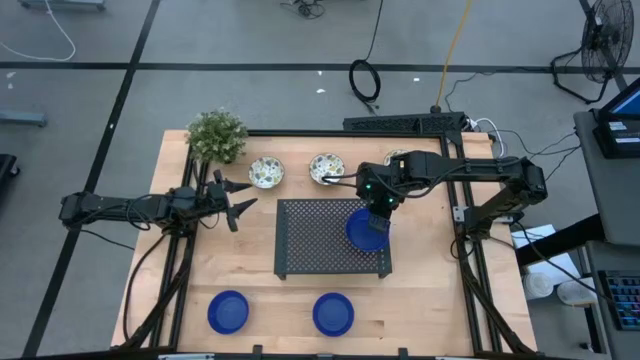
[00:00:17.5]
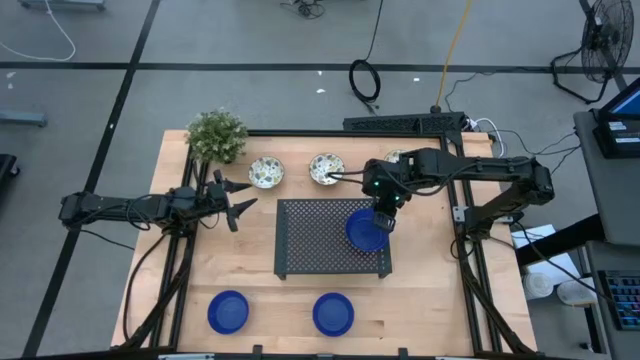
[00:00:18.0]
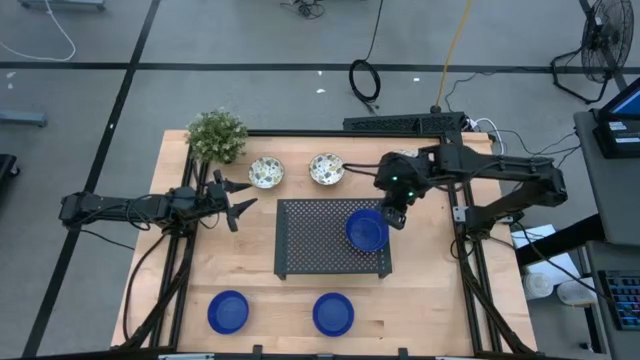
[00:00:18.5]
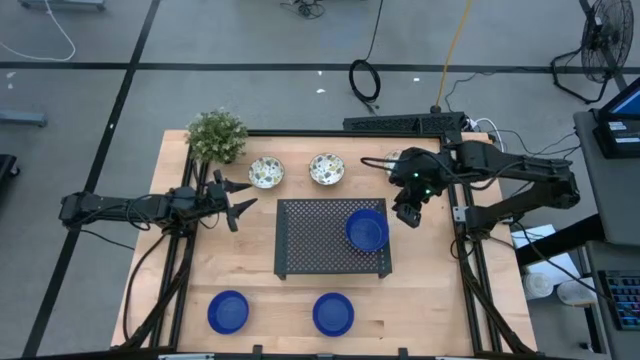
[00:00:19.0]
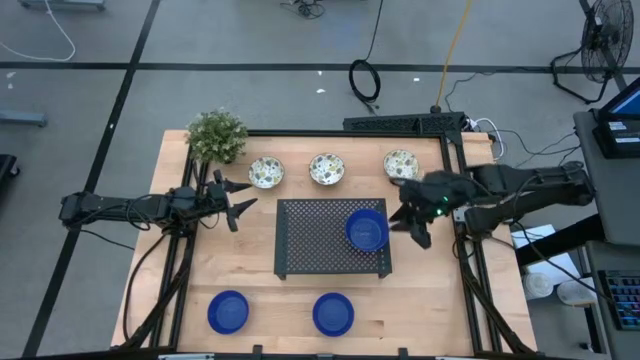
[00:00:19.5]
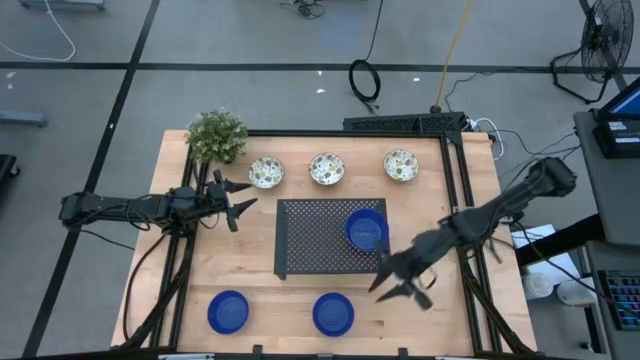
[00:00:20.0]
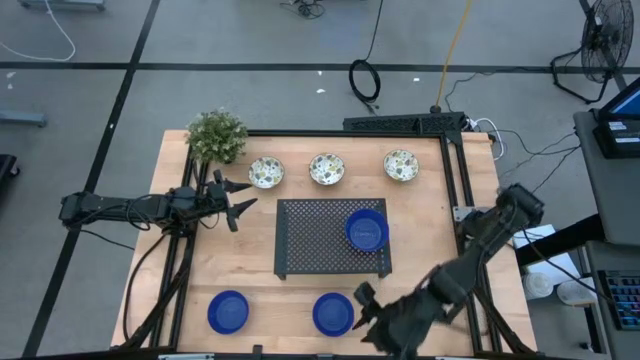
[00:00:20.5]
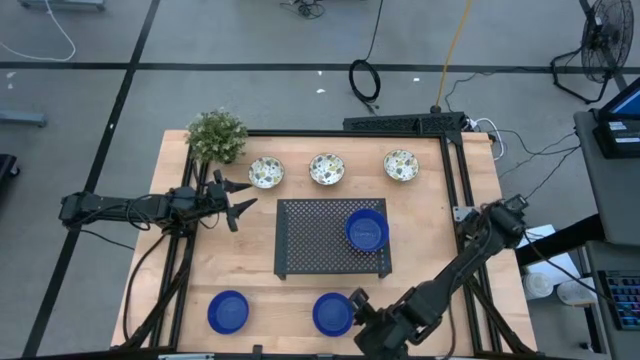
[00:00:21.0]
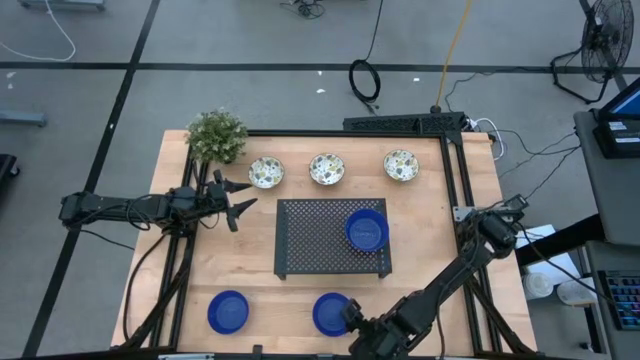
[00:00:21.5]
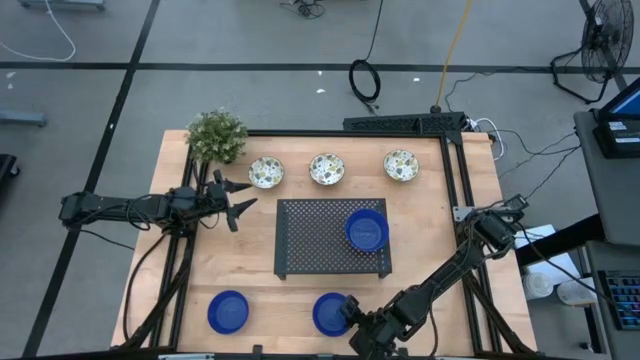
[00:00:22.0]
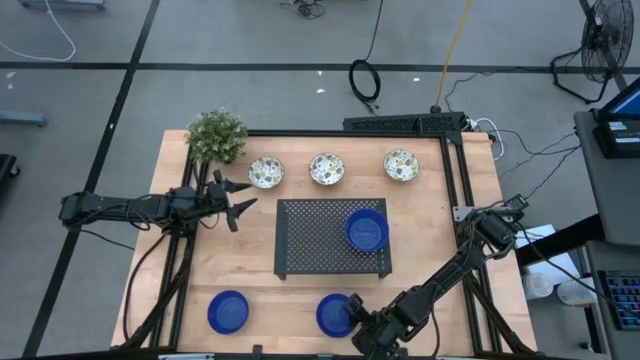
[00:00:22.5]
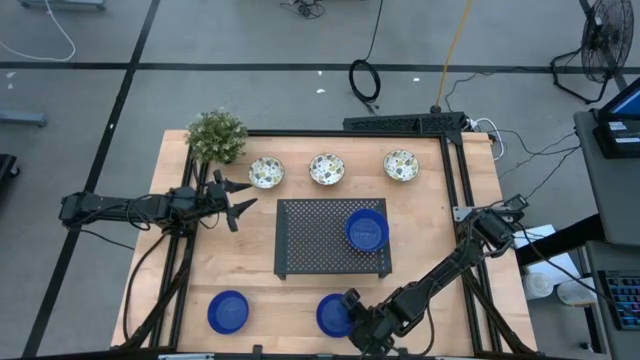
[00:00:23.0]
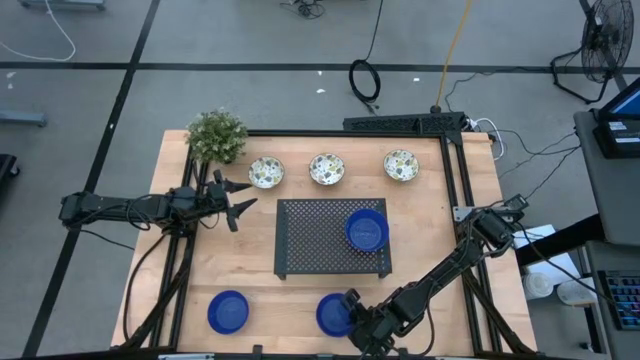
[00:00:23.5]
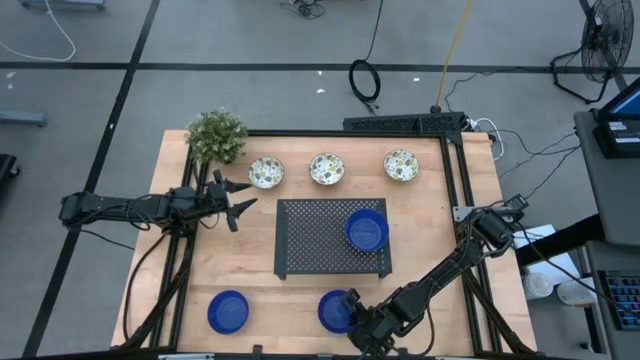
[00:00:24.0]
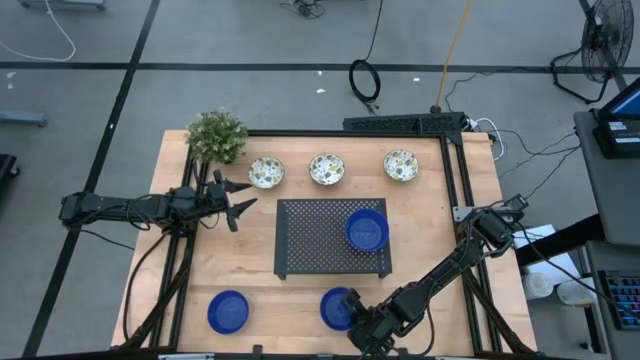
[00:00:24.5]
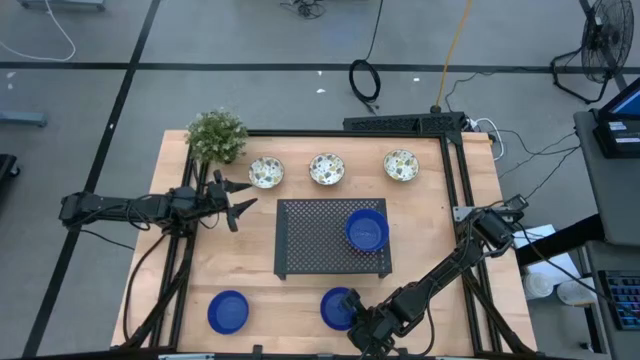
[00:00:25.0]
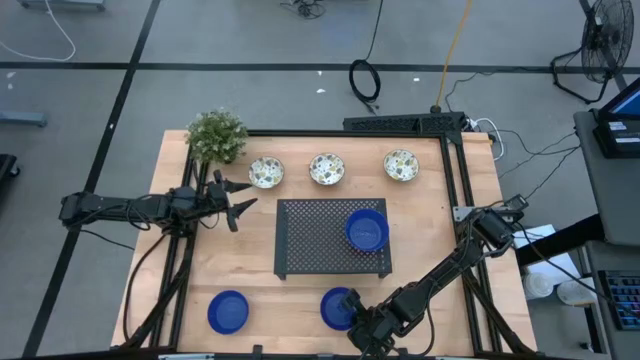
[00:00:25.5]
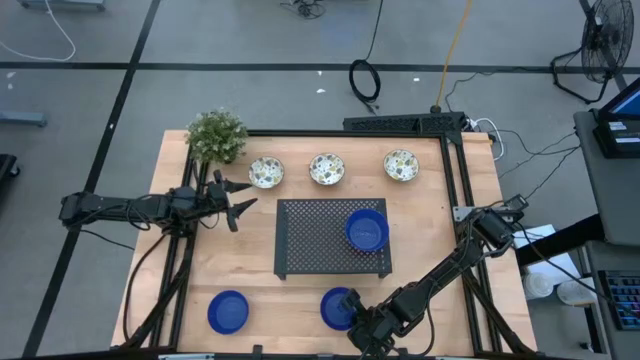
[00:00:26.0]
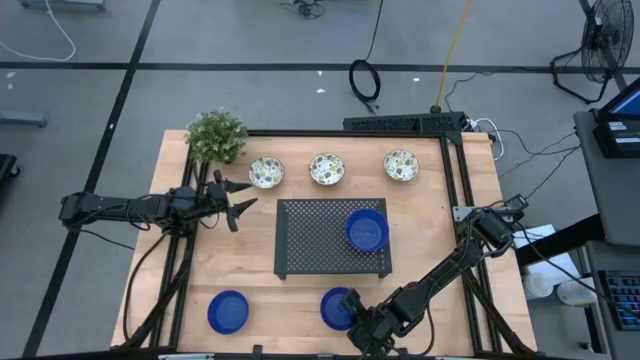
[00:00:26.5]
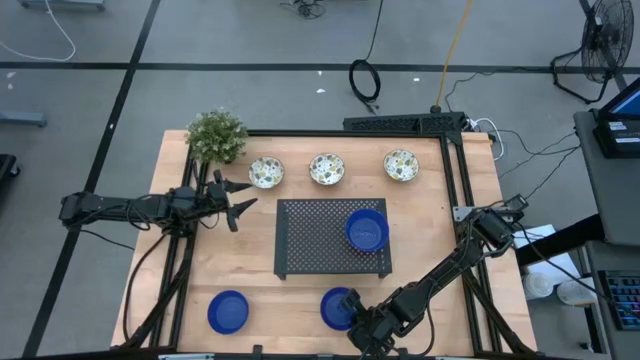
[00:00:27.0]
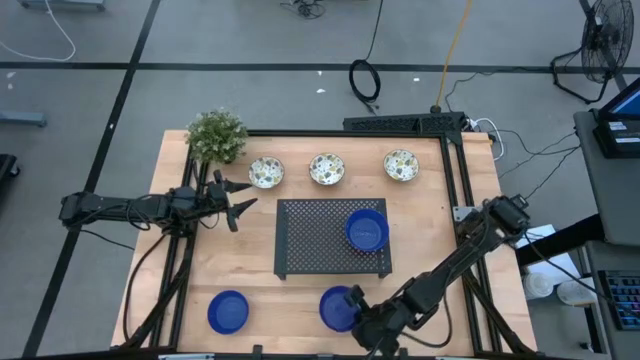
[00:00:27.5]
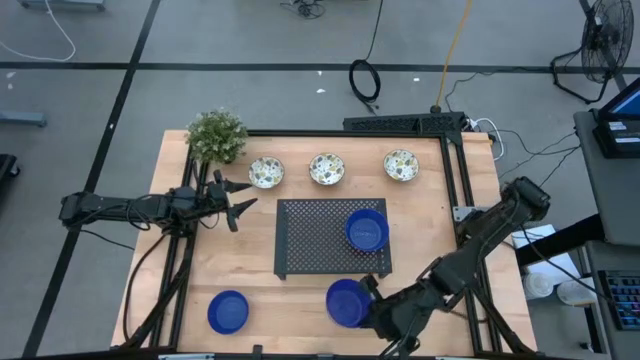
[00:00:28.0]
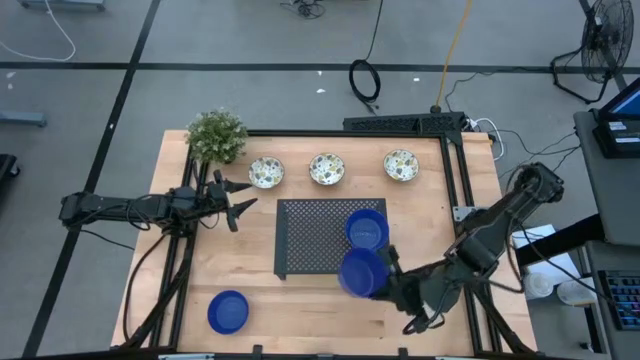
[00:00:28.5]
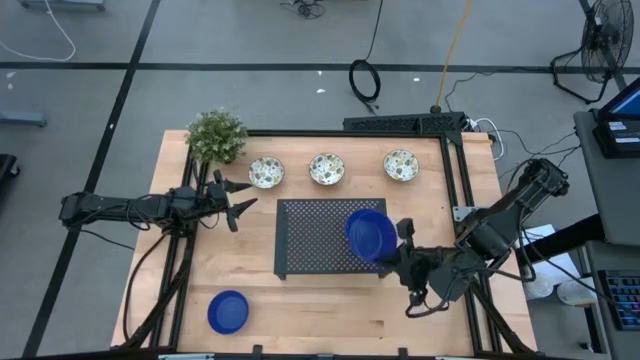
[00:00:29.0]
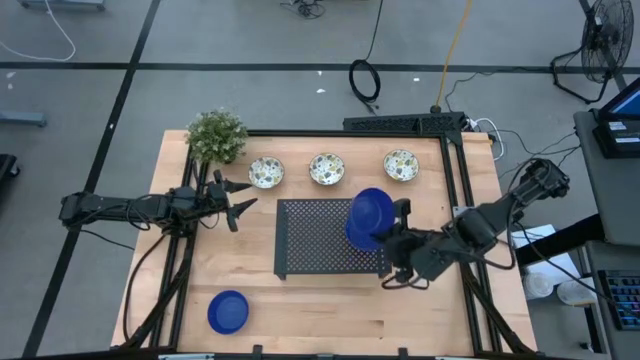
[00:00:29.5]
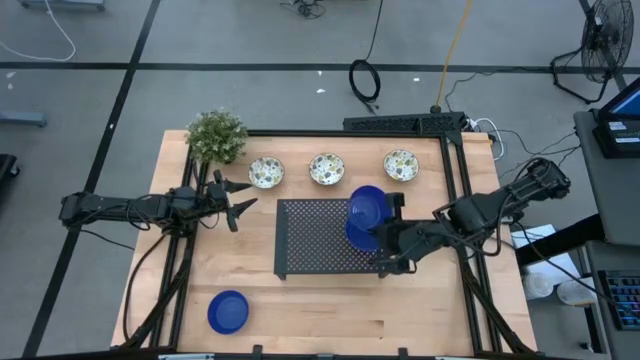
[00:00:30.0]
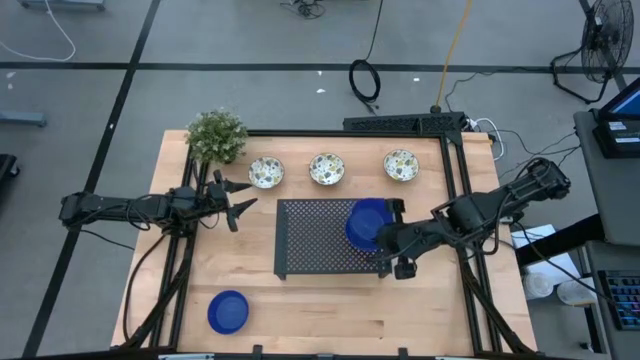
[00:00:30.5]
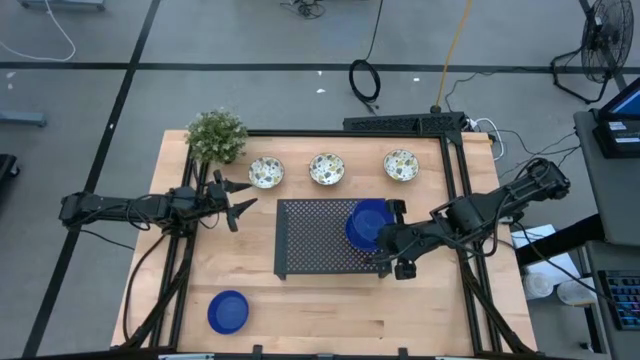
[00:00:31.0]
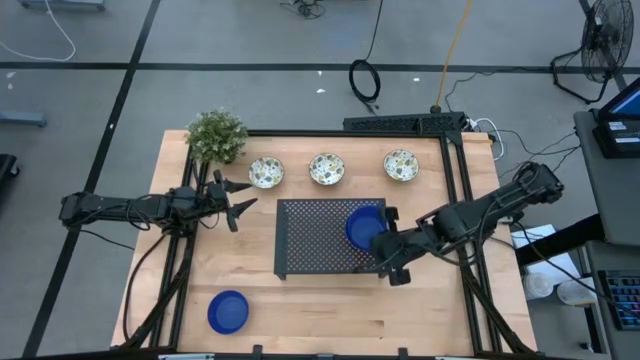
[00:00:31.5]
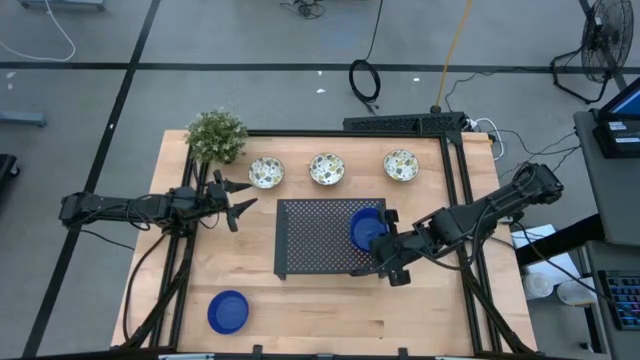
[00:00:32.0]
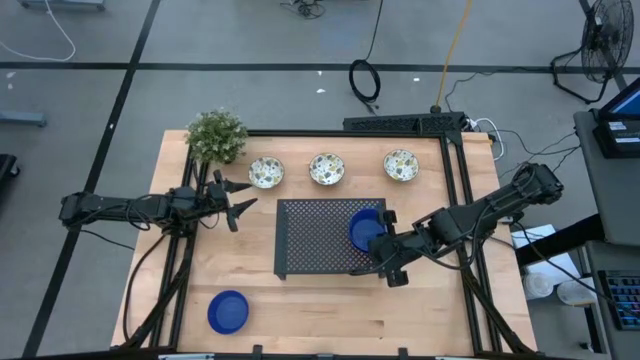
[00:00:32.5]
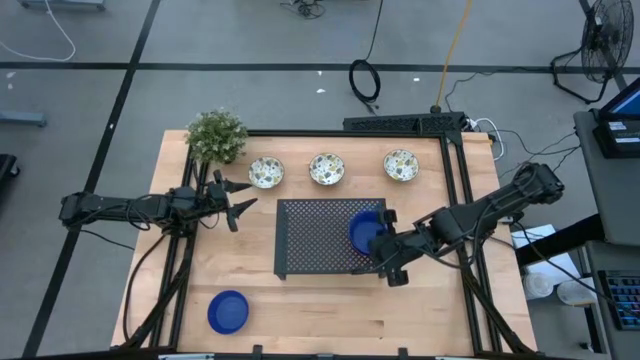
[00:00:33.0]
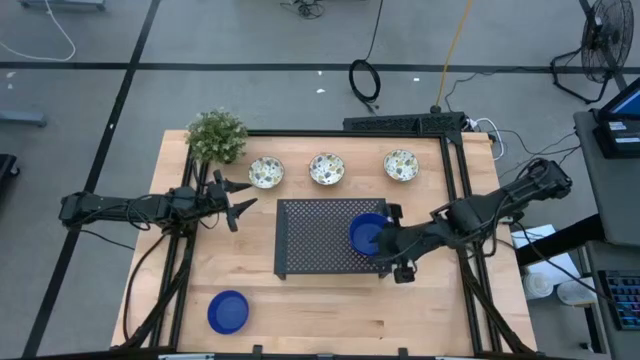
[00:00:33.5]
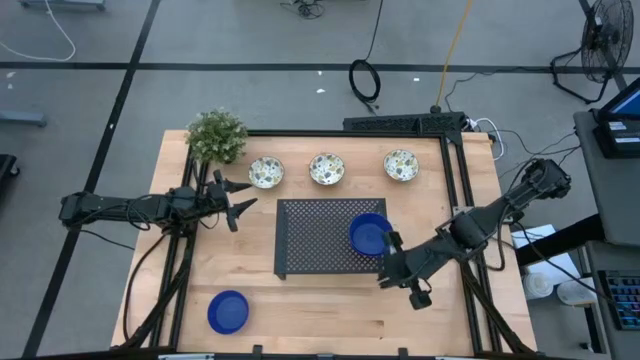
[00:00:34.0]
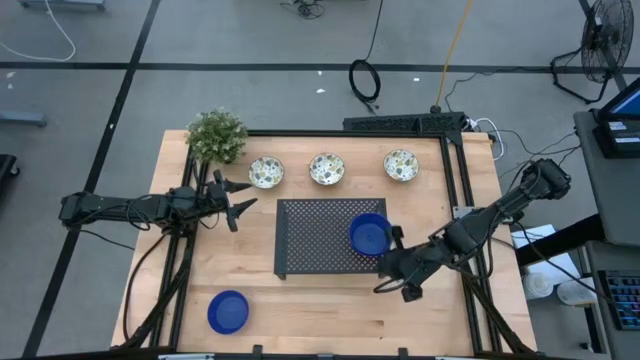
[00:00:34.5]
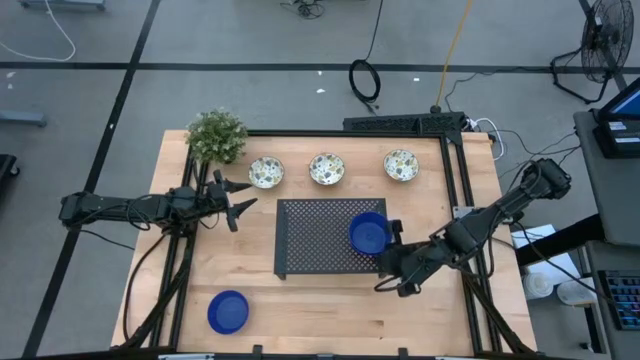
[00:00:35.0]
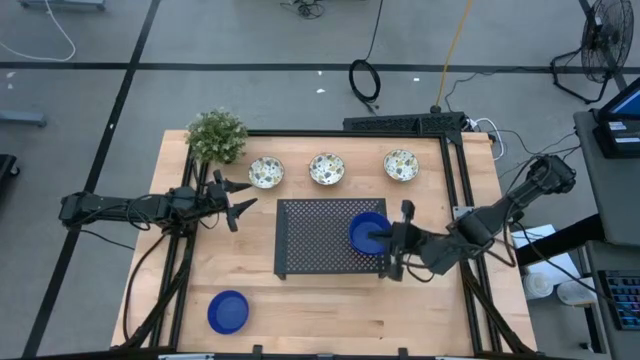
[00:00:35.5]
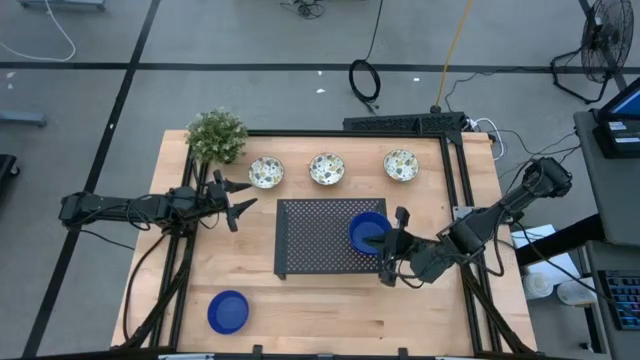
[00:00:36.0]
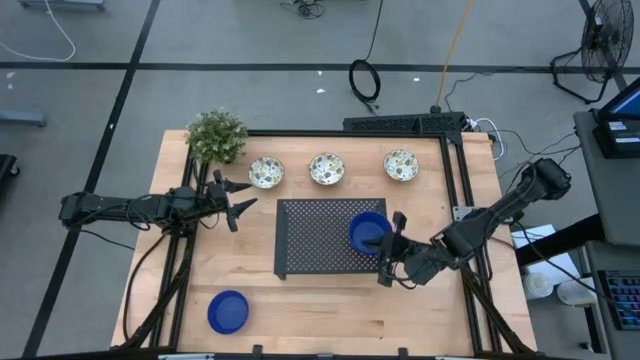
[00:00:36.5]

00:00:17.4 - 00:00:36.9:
Task: Pick & Place Mini bowls
Stack the right blue bowl on the blue bowl on the shelf

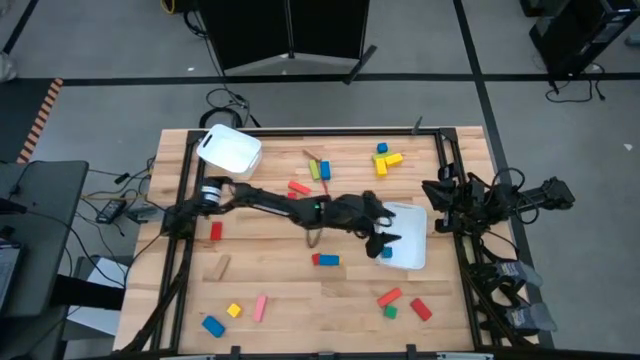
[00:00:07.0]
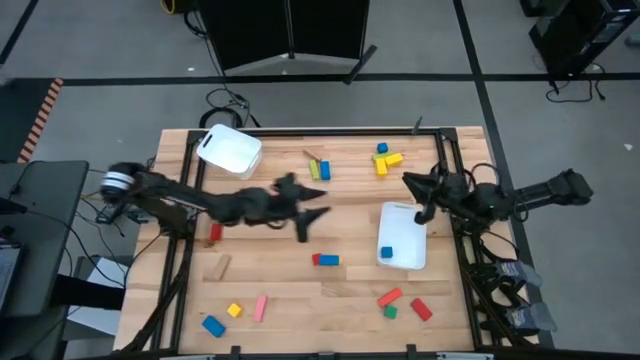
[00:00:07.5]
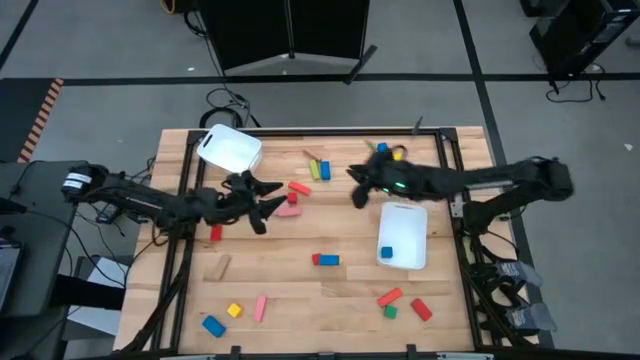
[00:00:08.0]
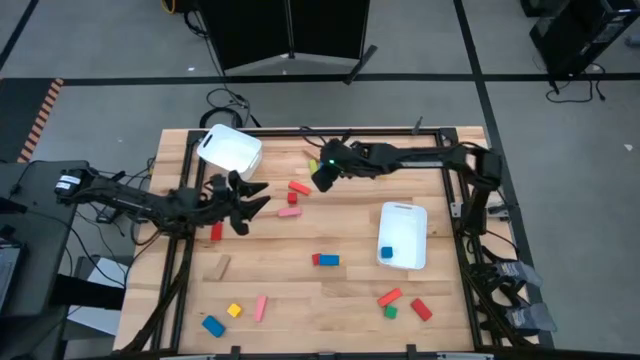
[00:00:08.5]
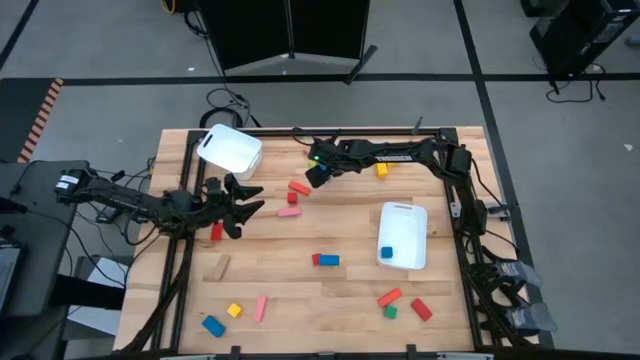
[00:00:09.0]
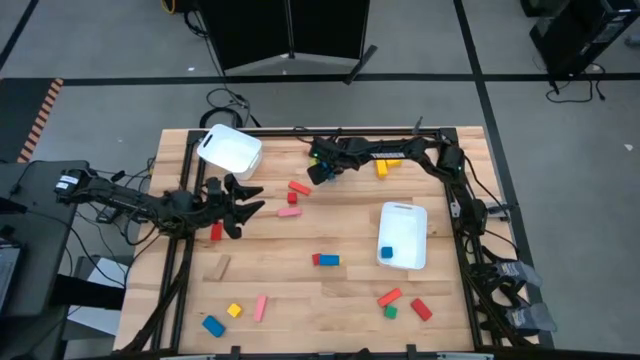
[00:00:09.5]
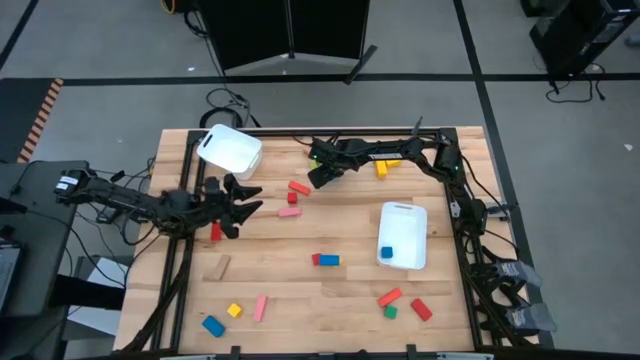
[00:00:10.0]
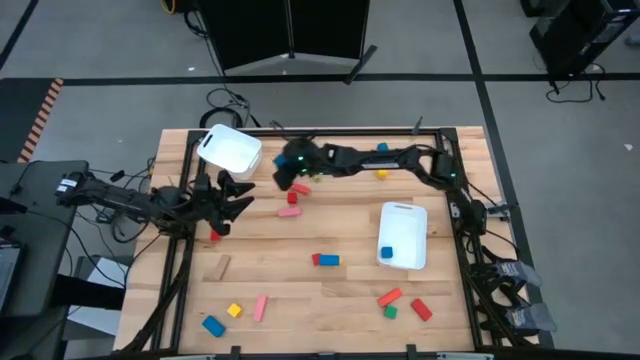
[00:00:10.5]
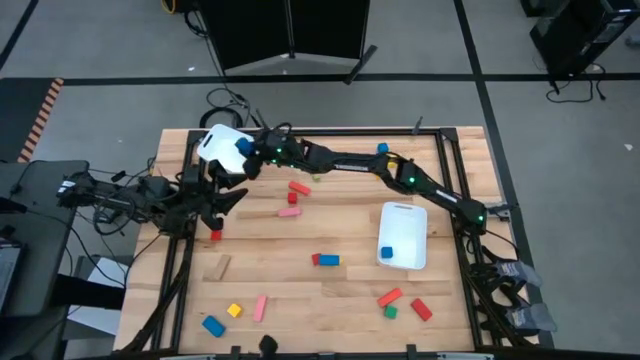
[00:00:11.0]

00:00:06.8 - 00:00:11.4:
Task: Sort blocks by size
Put the top blue rectangular block into the top white bin
